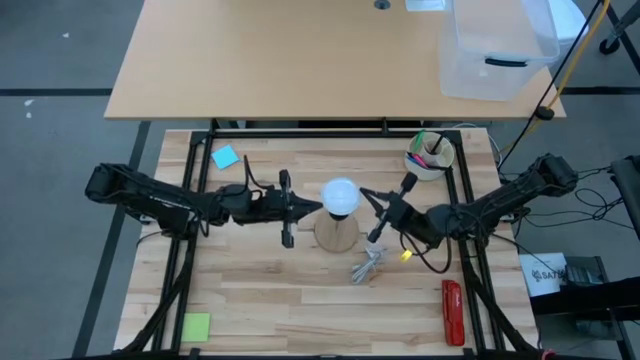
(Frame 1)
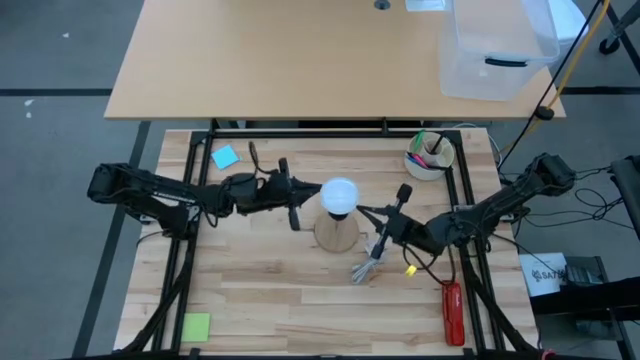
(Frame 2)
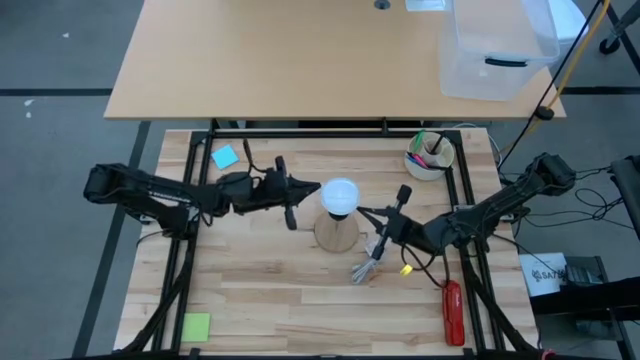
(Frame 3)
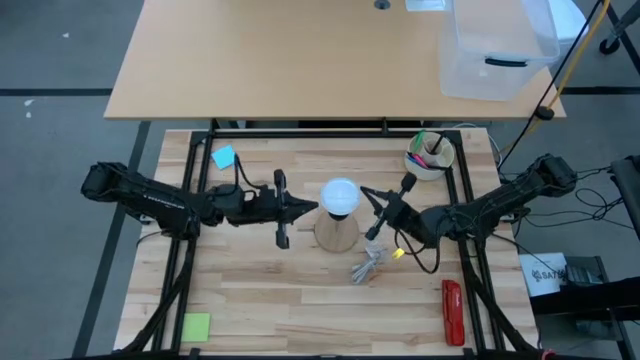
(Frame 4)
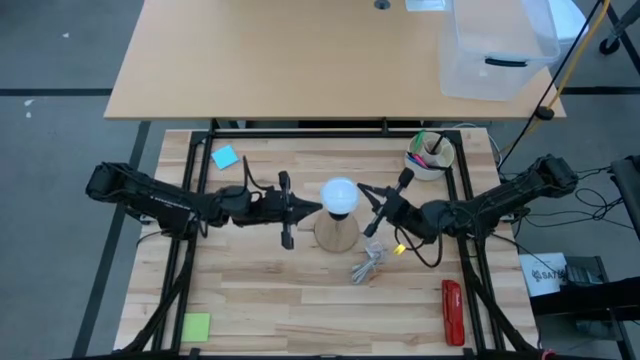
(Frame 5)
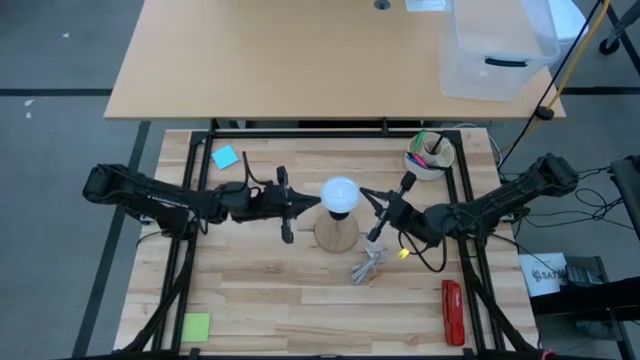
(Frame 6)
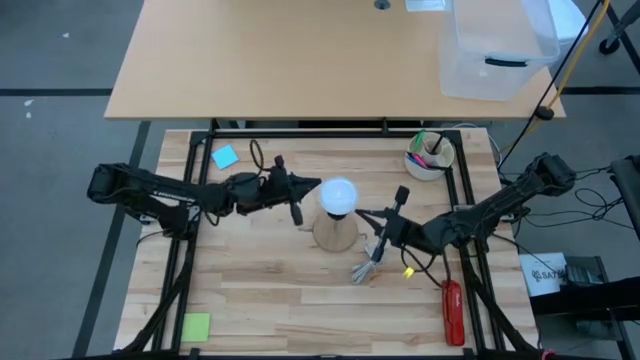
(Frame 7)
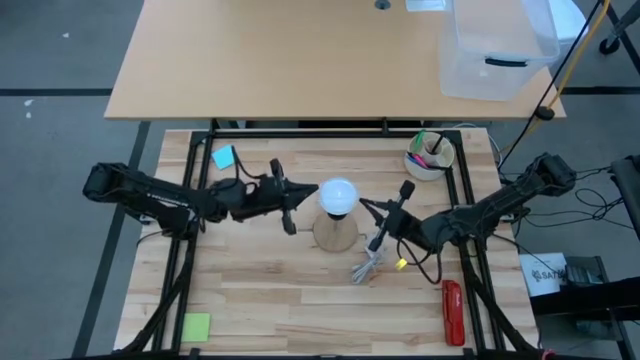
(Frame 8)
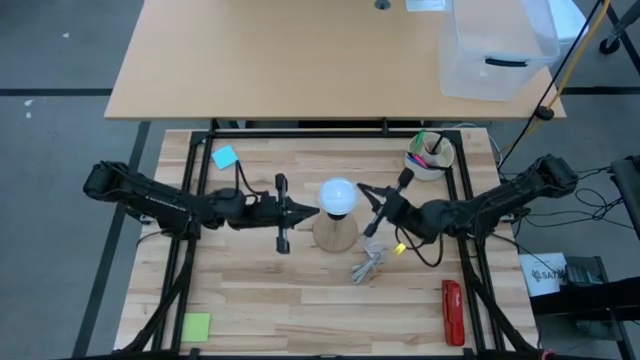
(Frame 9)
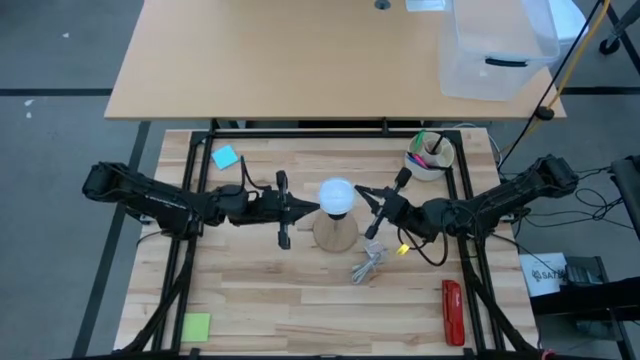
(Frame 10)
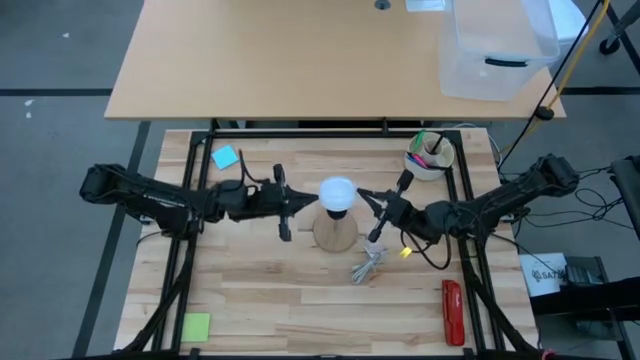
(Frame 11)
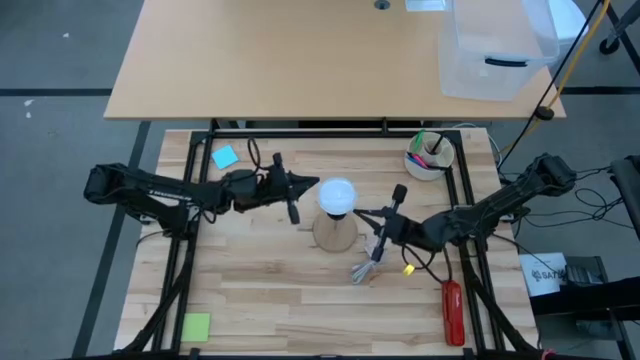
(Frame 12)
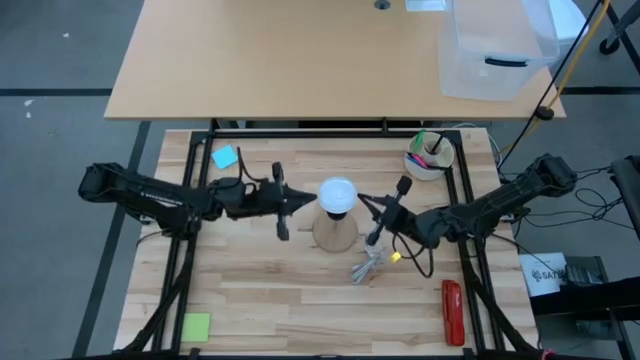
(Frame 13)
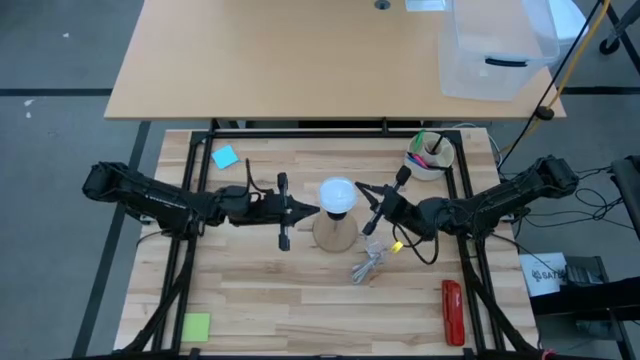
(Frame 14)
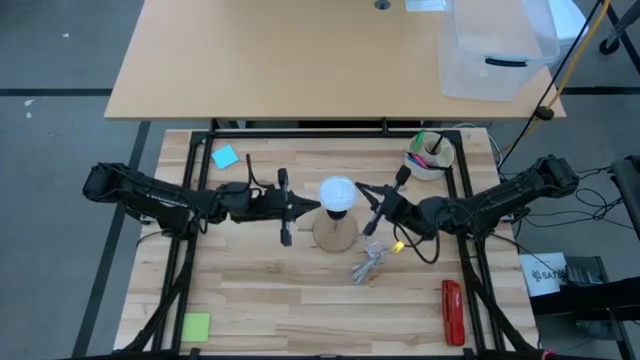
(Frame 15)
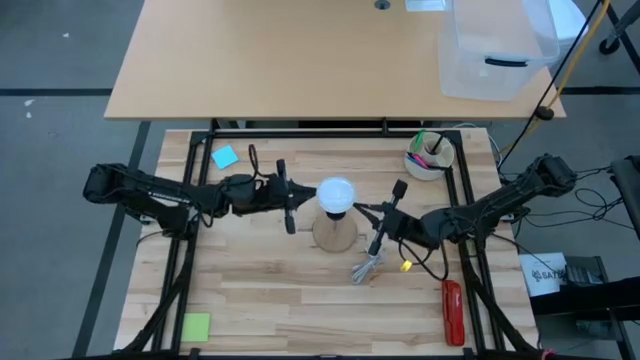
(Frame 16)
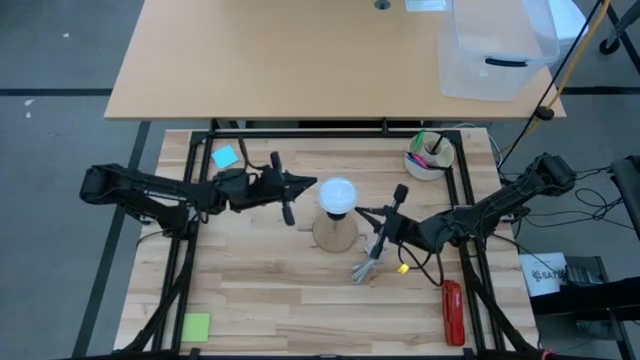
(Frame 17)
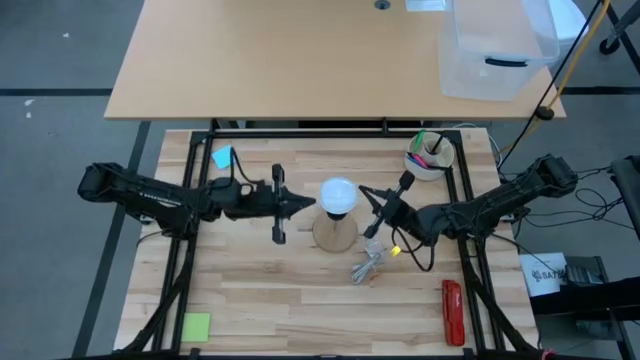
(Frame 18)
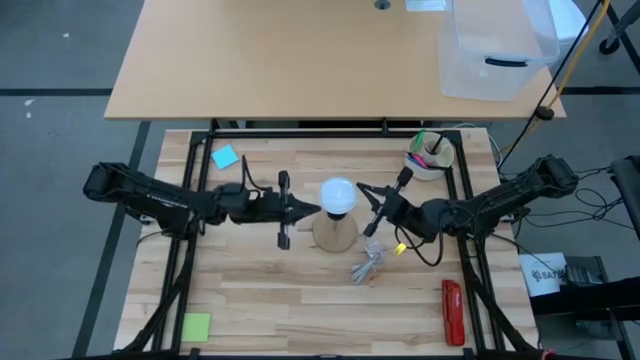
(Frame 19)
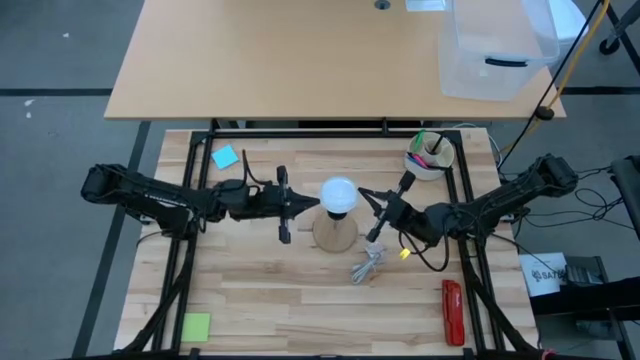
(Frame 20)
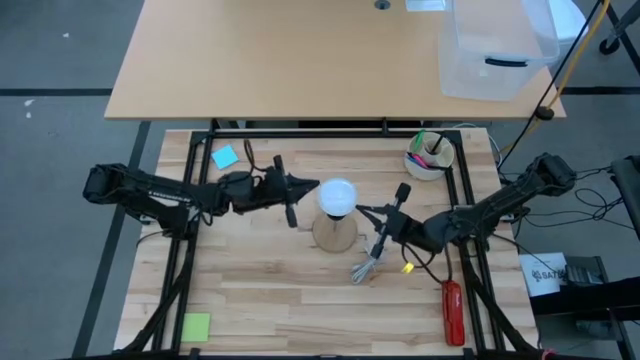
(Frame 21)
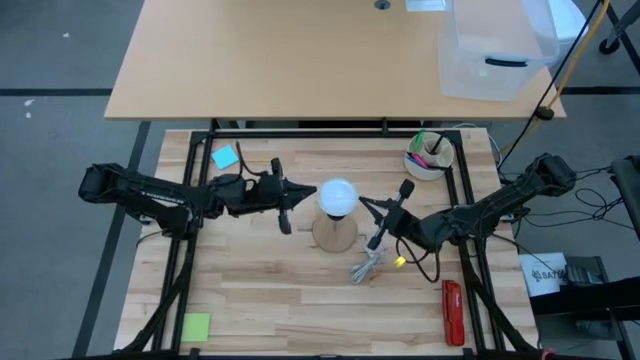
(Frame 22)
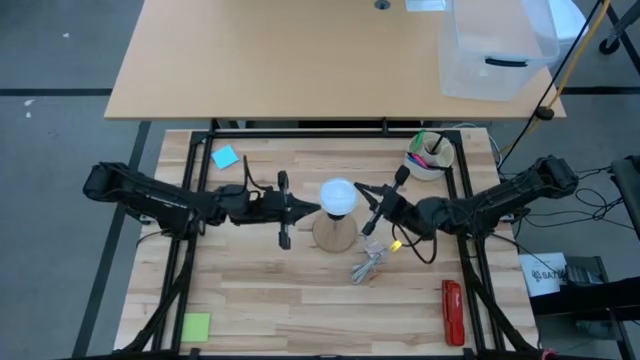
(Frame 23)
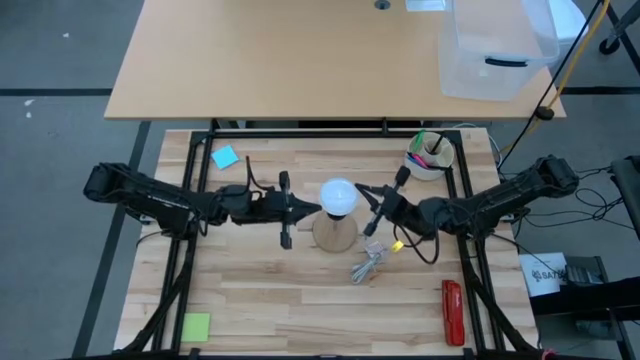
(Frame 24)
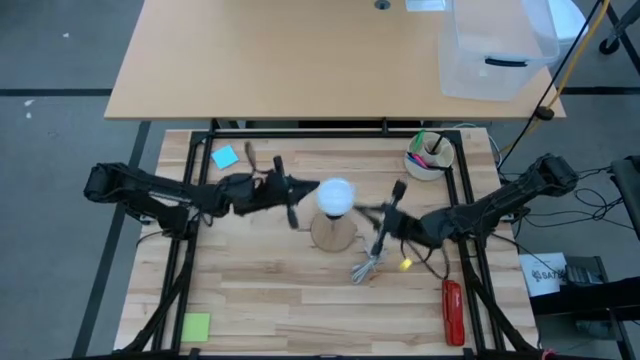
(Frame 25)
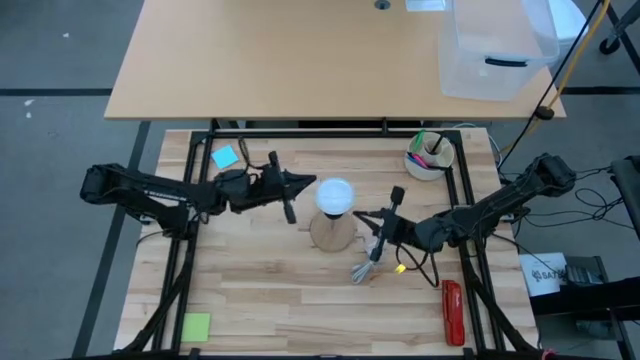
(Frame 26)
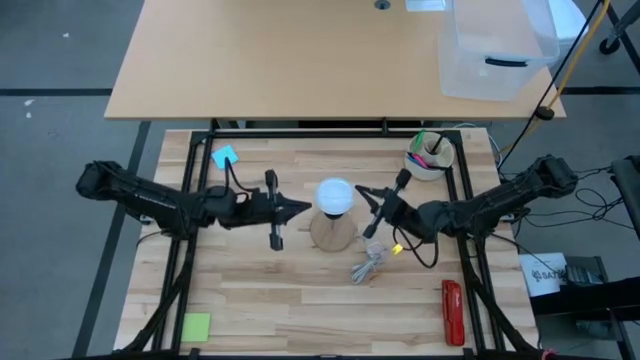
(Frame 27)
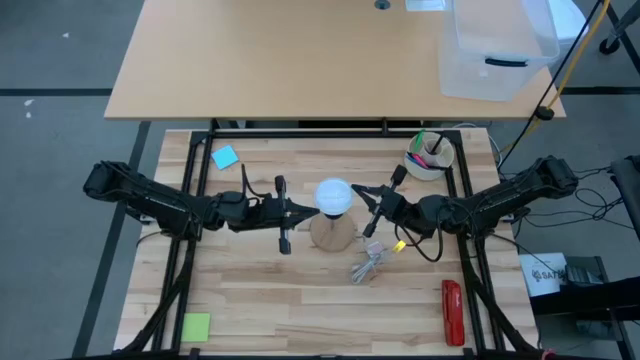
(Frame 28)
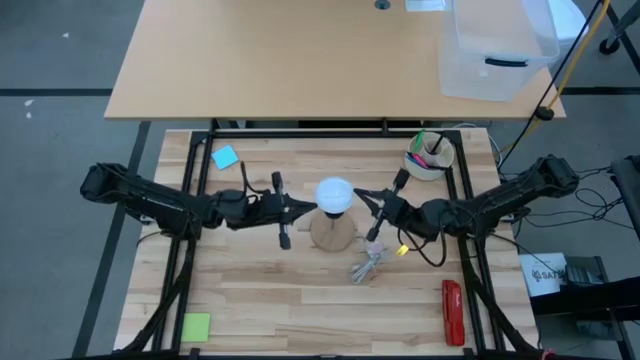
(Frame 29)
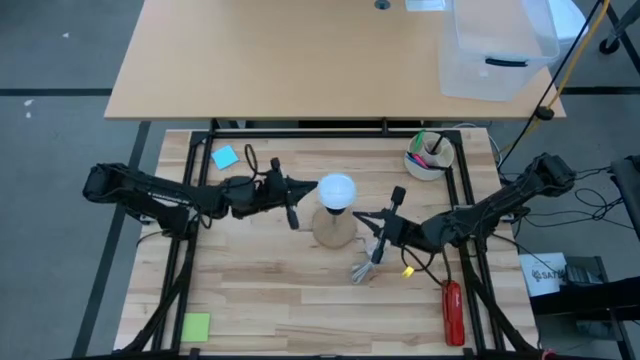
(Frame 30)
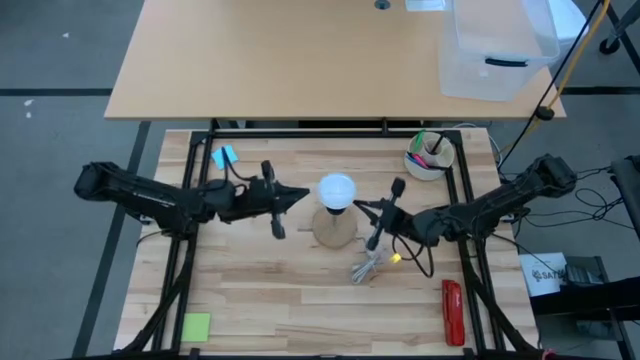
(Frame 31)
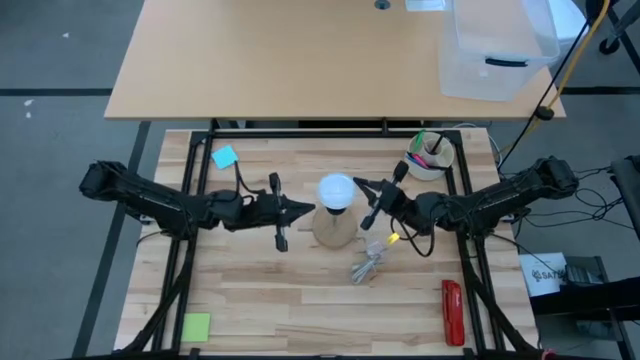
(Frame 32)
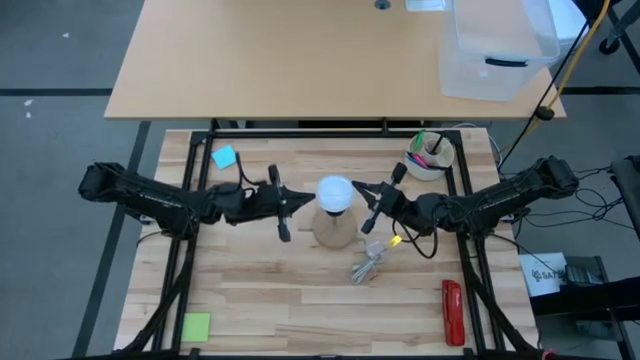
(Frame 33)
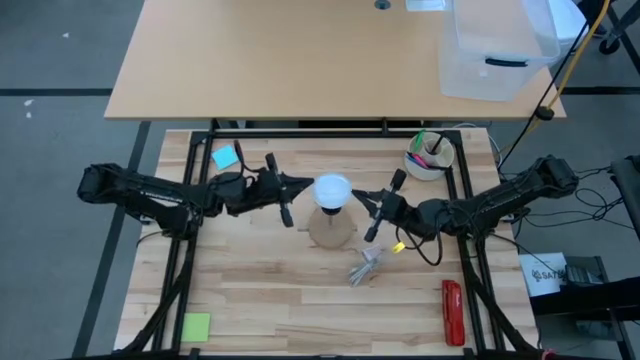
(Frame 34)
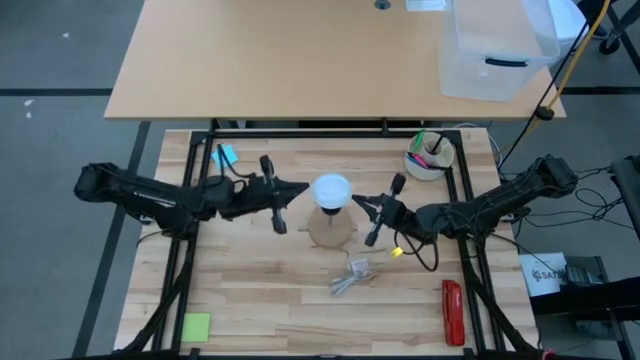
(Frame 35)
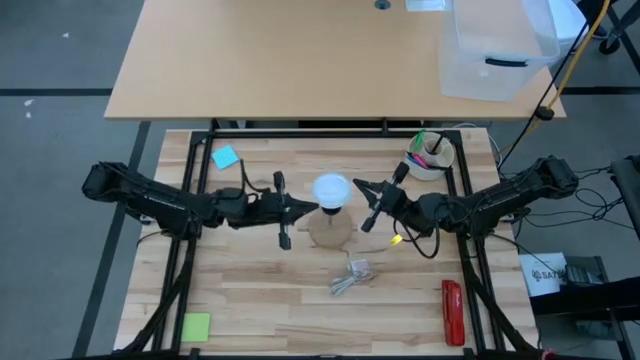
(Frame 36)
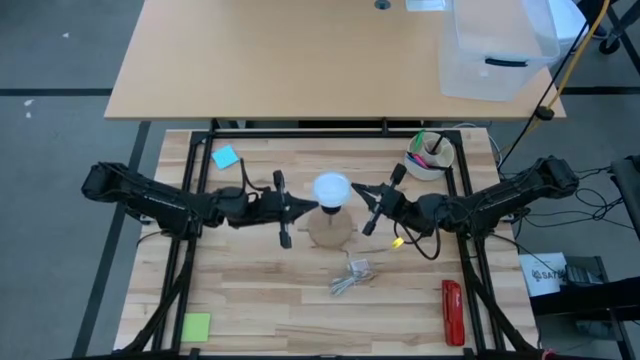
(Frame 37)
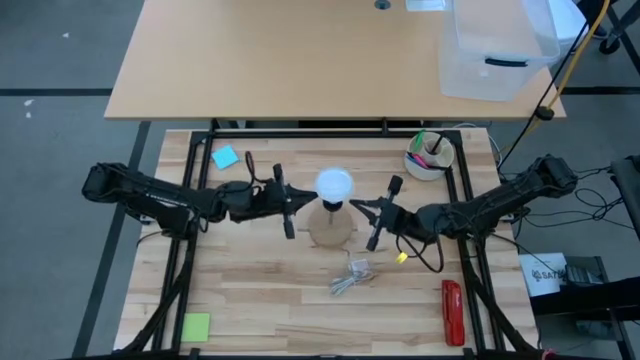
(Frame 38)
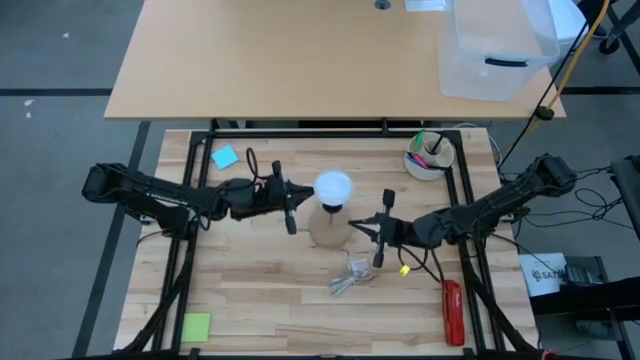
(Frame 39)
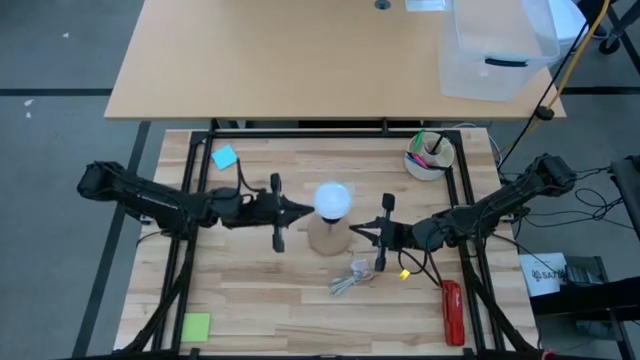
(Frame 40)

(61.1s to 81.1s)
Task: Screw lightbulb
Insert the lightbulb into the lamp
